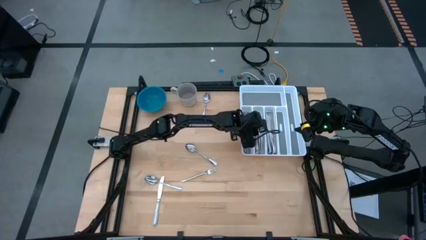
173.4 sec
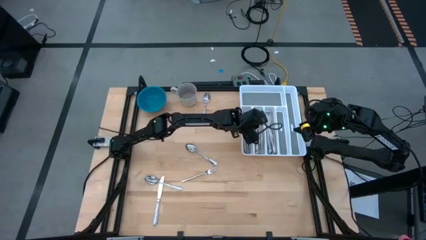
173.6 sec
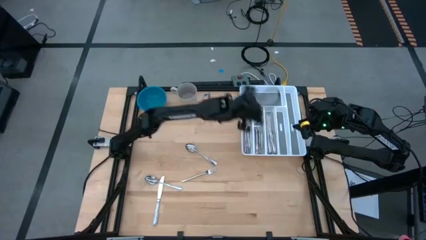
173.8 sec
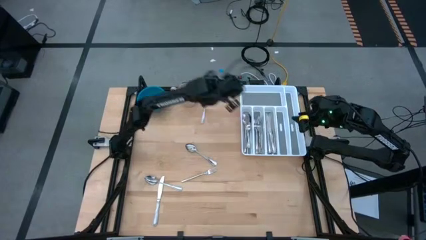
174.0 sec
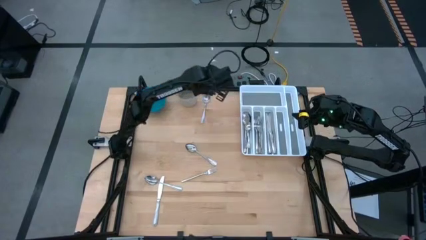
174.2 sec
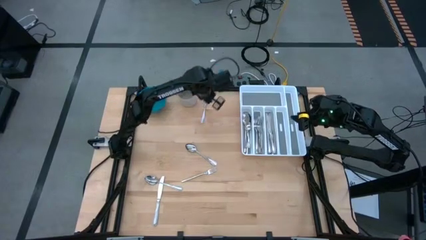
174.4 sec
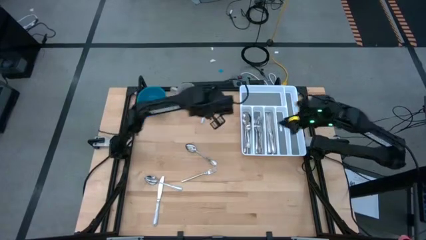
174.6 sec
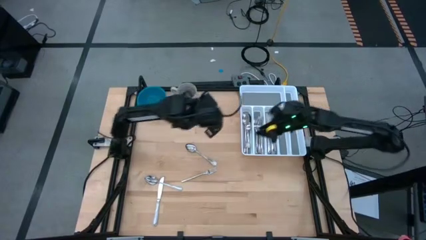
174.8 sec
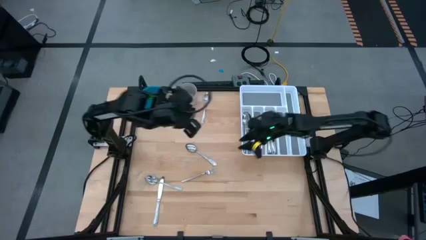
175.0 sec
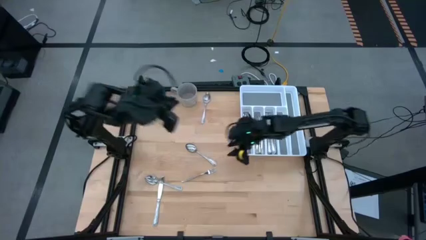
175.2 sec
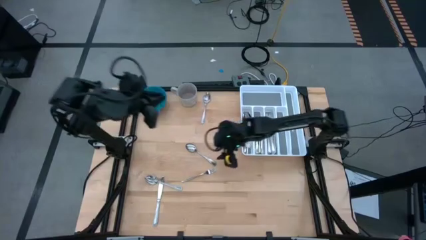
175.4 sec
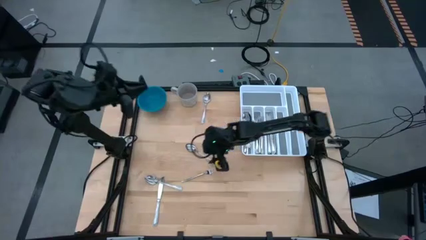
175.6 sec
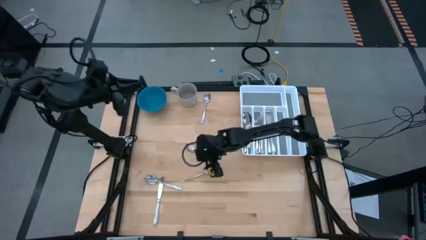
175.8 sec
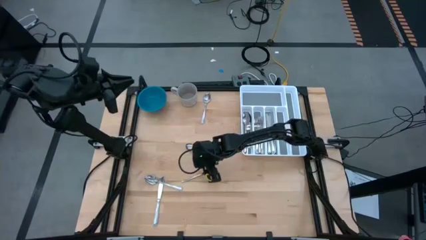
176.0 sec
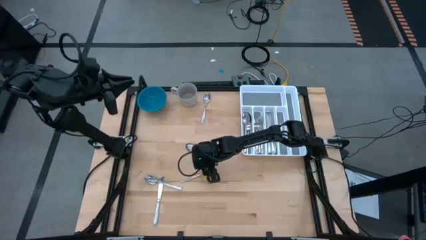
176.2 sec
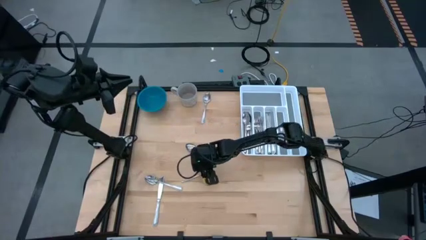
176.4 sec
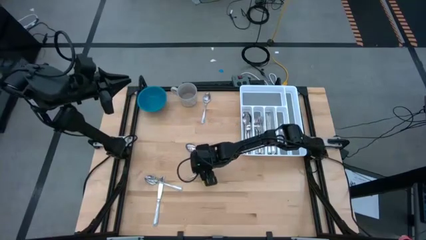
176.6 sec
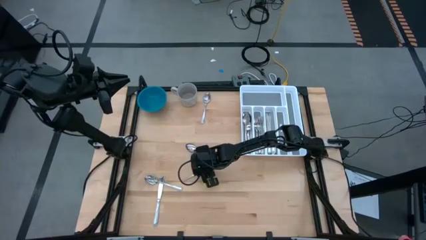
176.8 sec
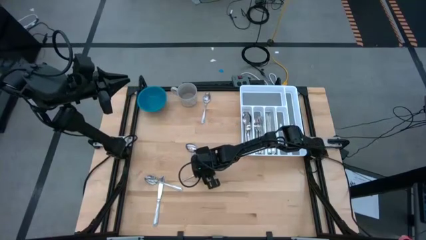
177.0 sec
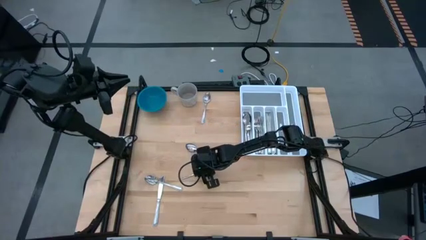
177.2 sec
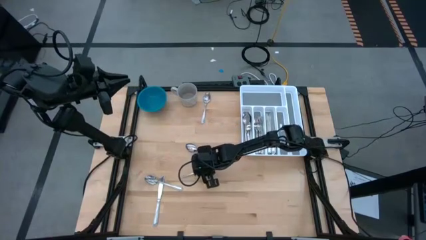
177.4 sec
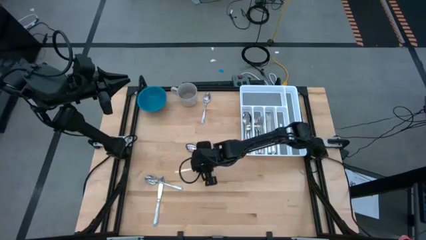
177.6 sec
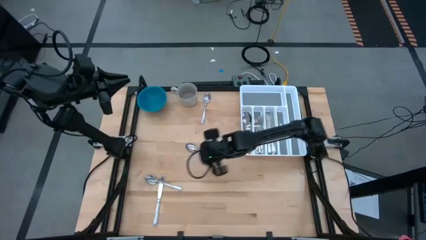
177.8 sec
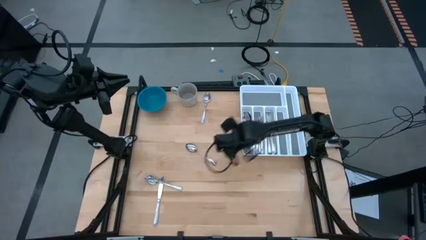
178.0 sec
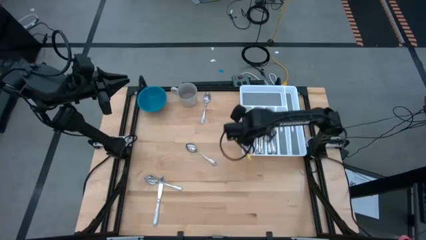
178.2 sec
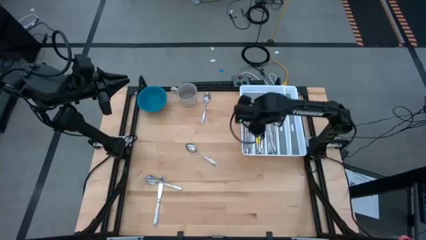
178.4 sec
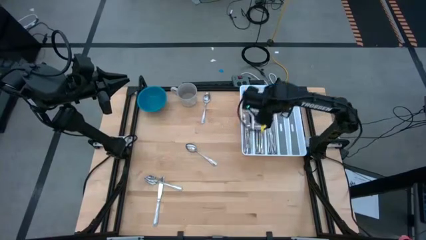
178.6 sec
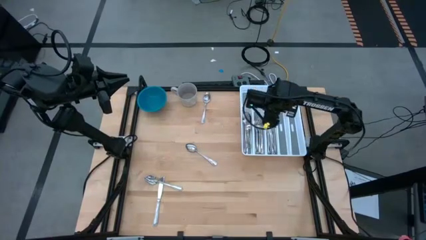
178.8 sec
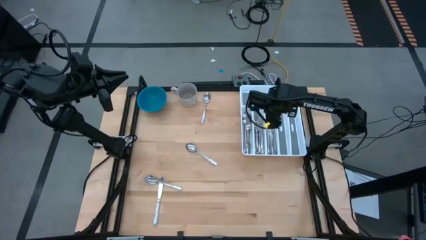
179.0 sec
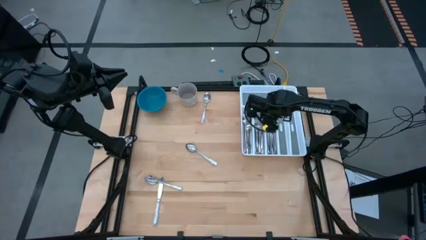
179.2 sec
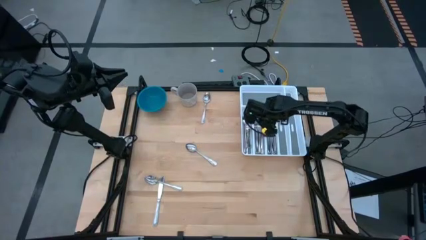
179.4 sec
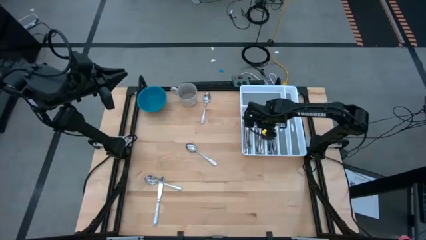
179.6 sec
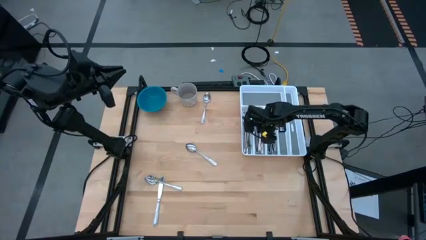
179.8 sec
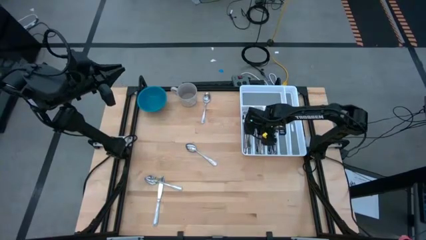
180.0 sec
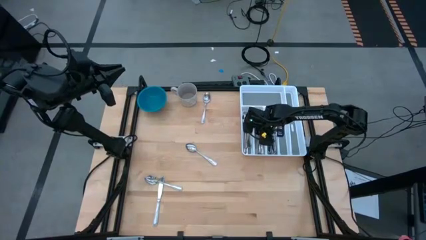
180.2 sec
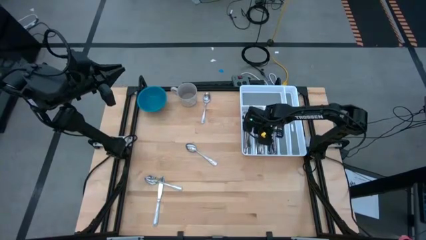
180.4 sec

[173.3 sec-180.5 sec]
Task: Sort silverware
Put the fork in the silverware tray

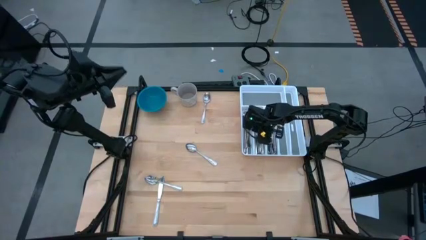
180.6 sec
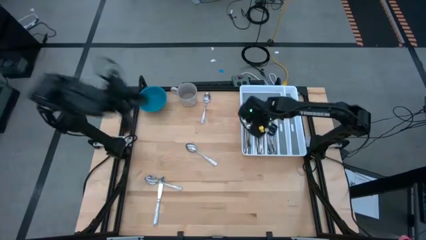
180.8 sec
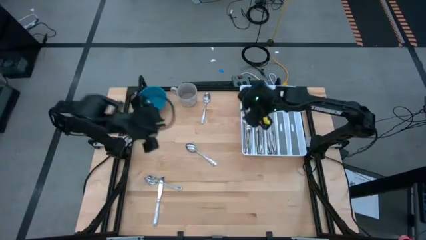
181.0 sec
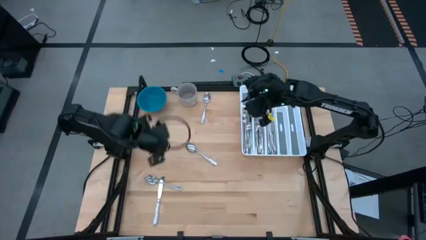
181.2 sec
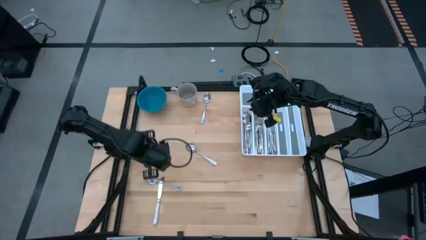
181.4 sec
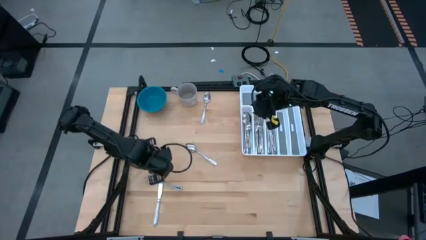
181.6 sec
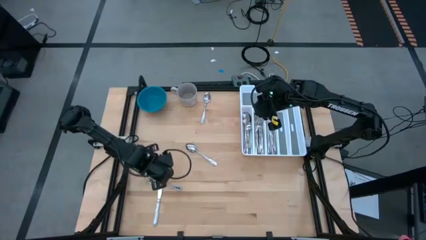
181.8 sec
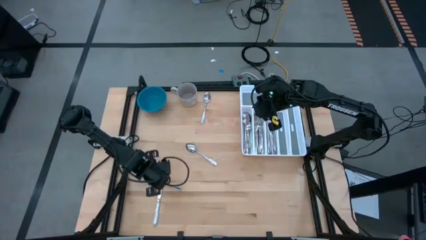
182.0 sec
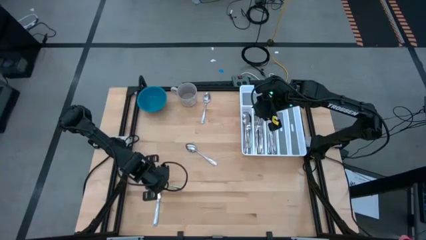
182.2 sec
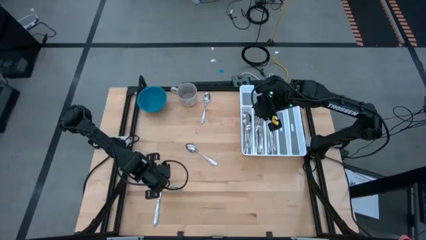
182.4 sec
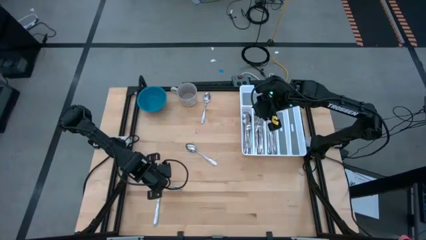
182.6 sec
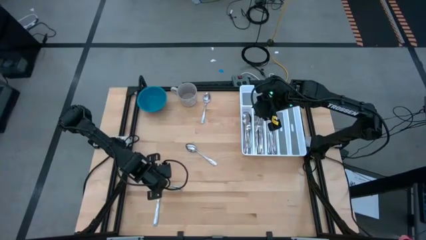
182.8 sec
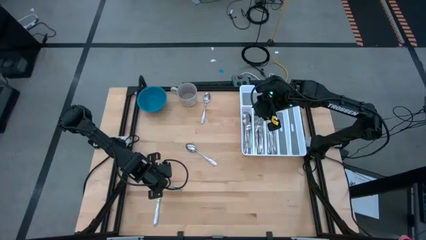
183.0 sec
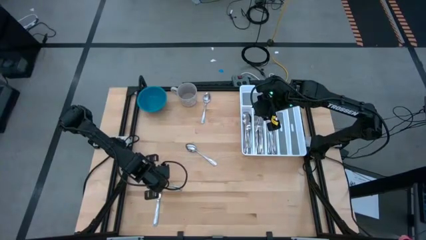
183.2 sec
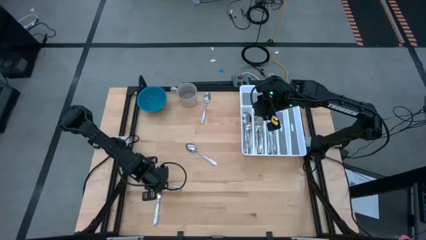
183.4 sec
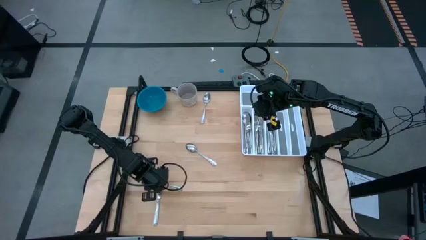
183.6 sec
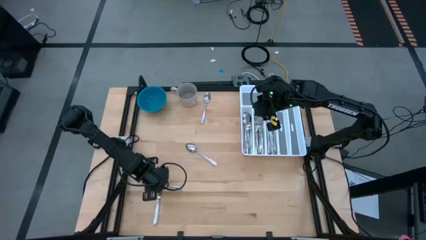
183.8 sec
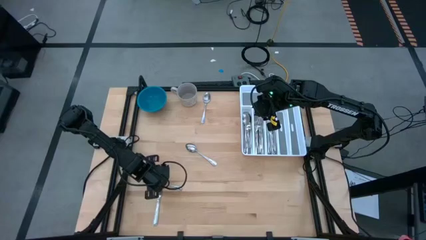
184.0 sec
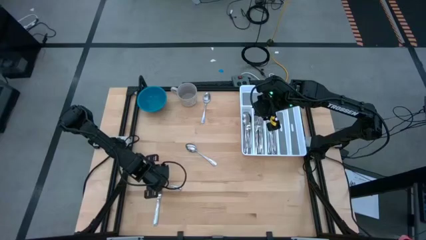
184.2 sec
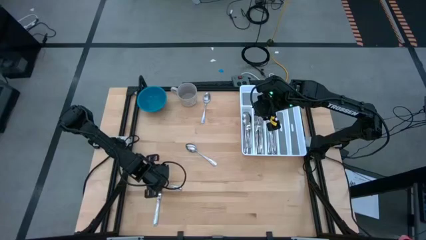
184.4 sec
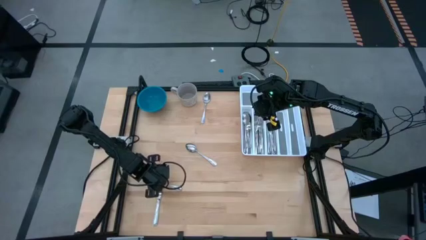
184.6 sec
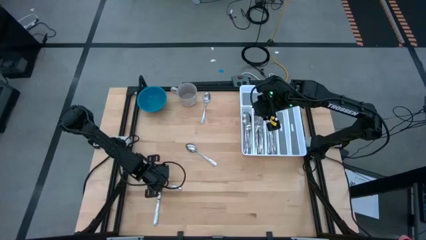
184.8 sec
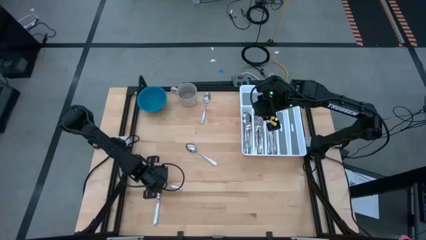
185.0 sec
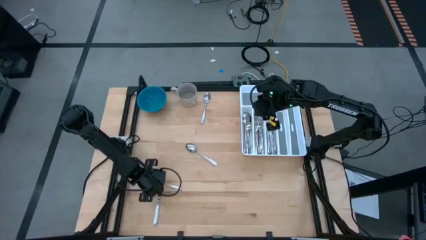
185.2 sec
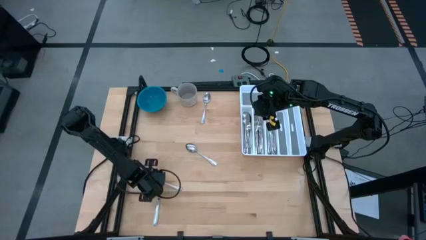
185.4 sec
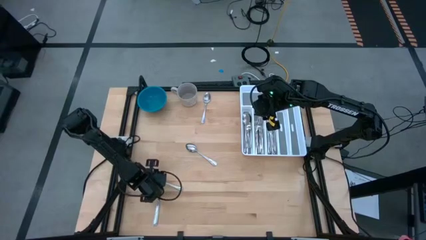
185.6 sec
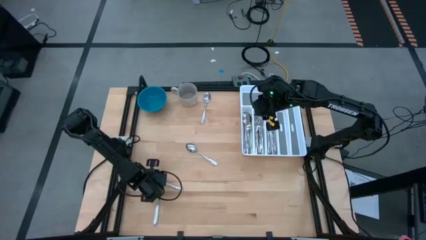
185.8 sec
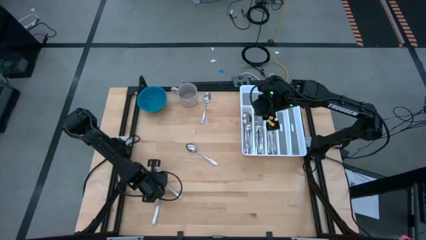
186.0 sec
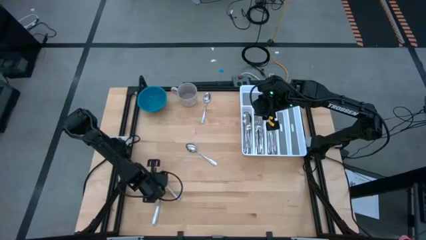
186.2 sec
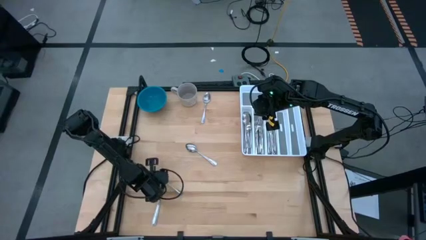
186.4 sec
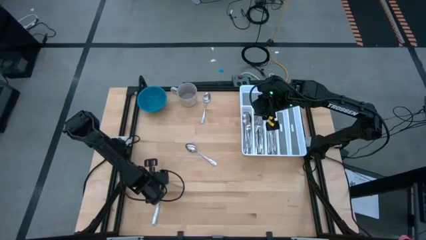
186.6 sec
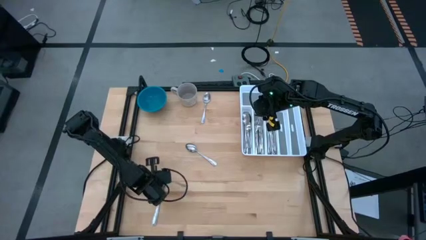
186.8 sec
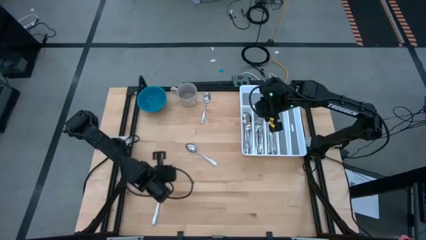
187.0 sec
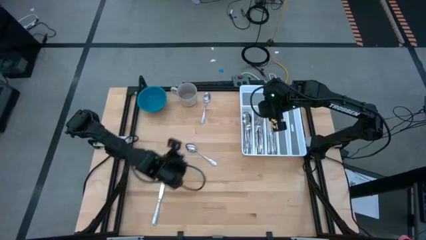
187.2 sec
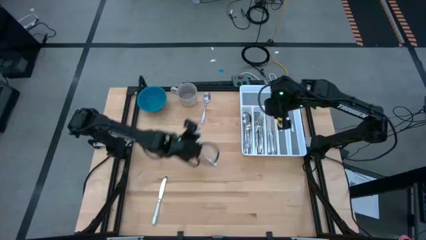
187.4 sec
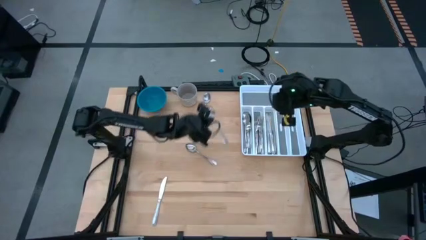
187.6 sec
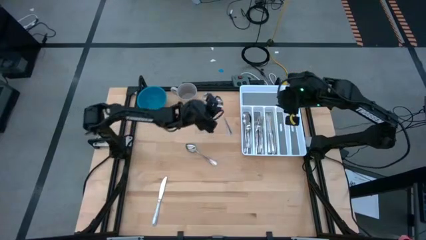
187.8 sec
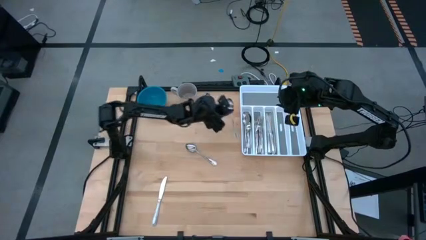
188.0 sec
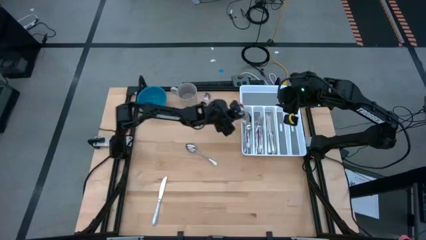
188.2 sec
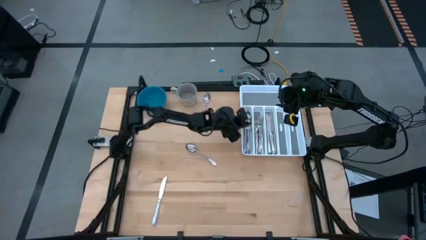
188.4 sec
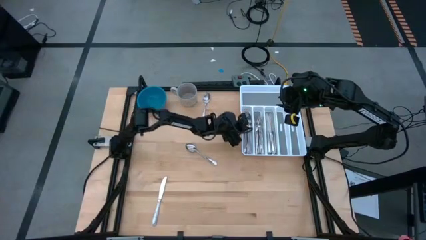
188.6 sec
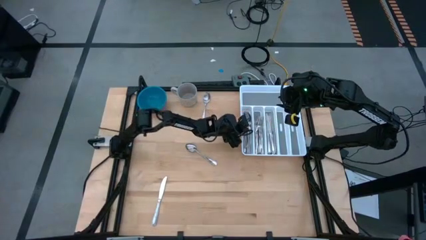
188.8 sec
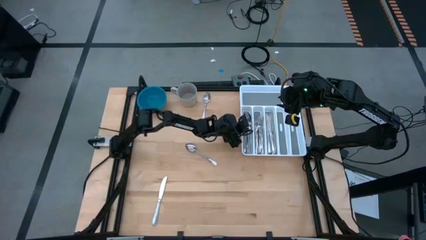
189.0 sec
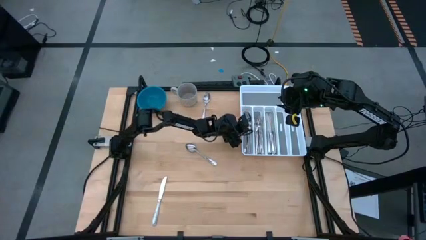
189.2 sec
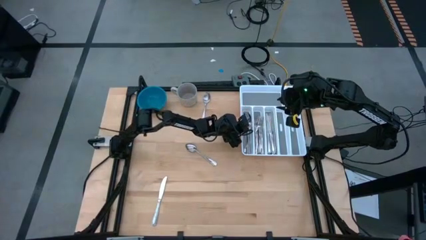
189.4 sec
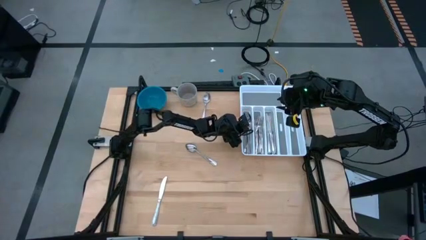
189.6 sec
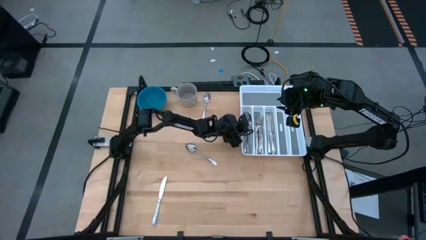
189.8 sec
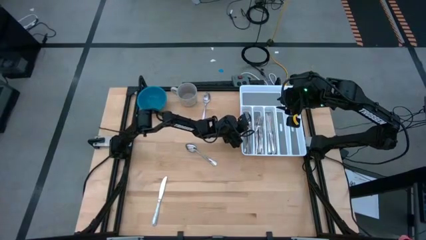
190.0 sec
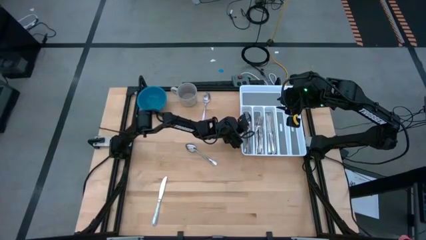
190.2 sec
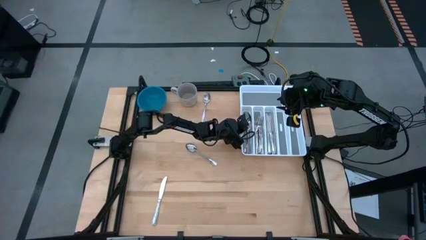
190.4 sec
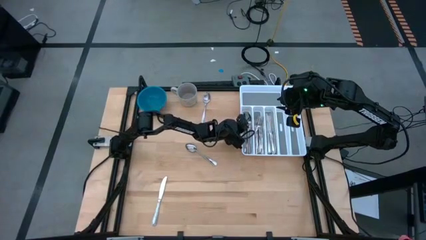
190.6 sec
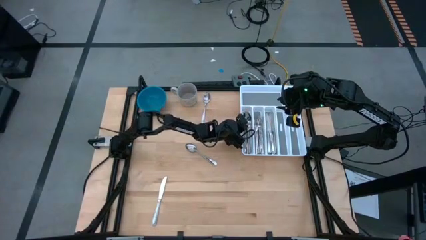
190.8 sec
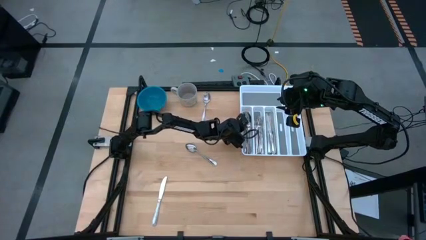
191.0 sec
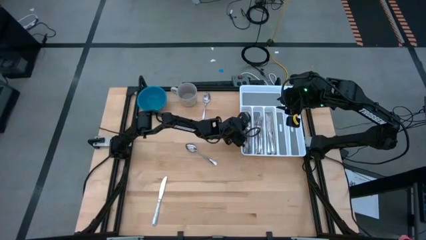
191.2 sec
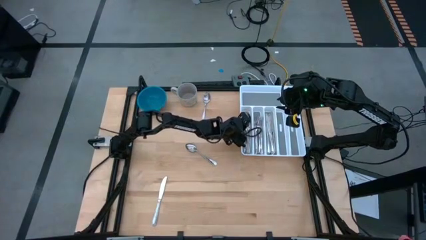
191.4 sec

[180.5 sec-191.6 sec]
Put the spoon in the silverware tray
